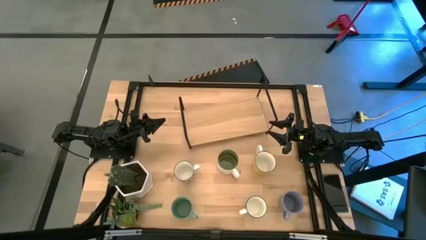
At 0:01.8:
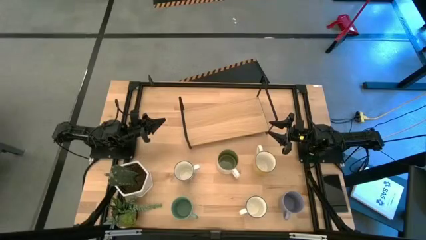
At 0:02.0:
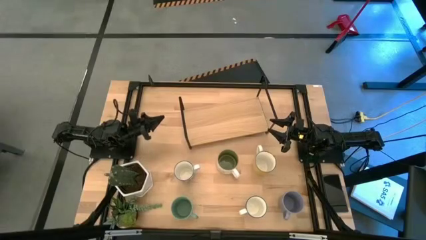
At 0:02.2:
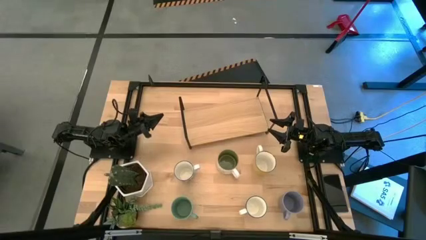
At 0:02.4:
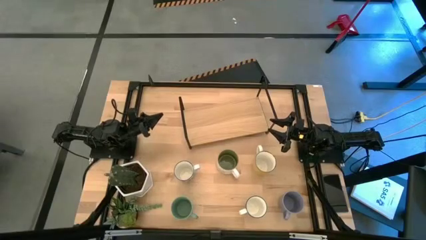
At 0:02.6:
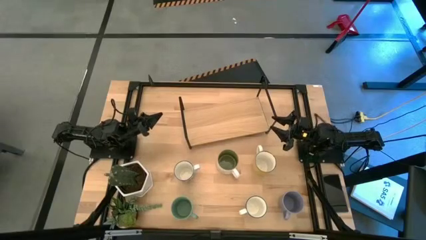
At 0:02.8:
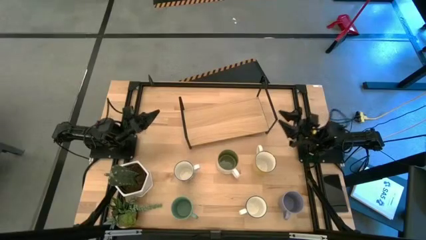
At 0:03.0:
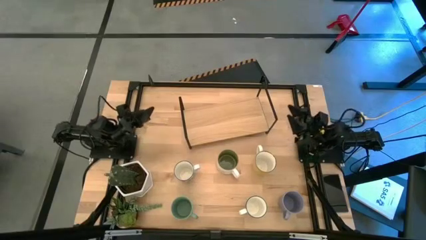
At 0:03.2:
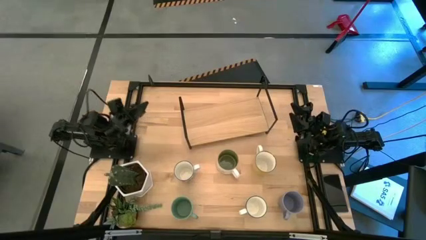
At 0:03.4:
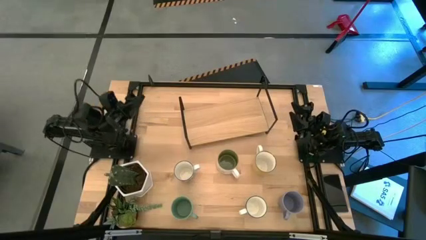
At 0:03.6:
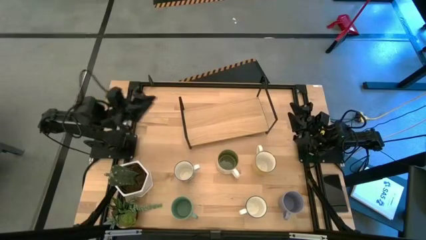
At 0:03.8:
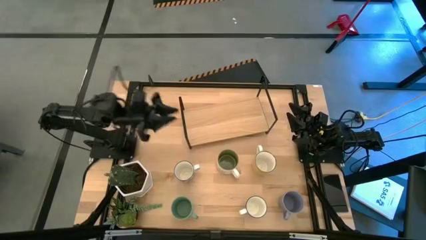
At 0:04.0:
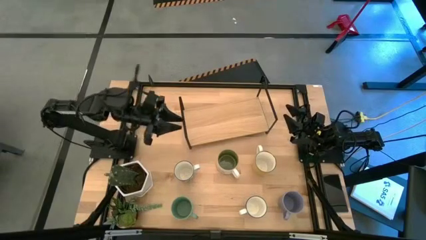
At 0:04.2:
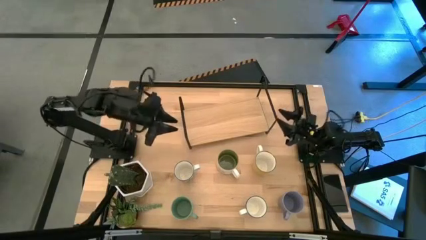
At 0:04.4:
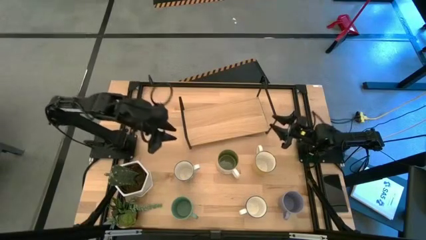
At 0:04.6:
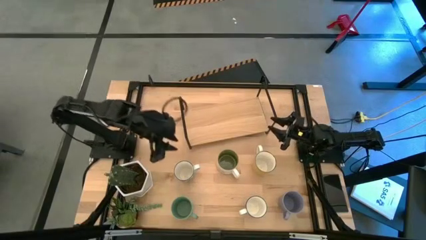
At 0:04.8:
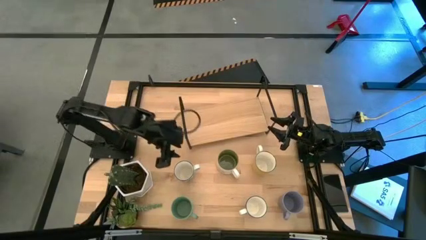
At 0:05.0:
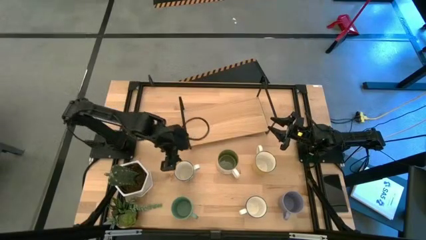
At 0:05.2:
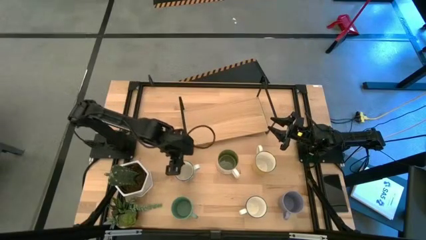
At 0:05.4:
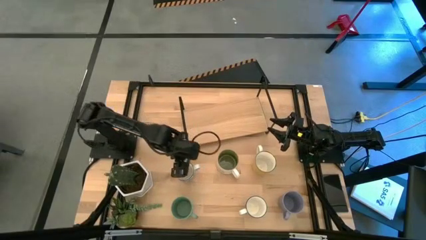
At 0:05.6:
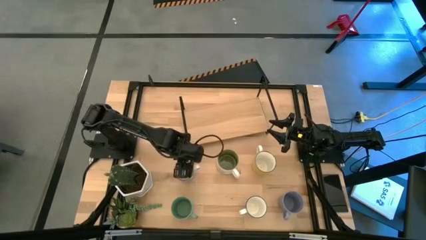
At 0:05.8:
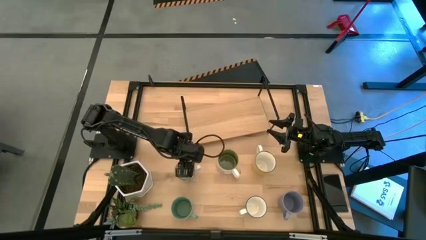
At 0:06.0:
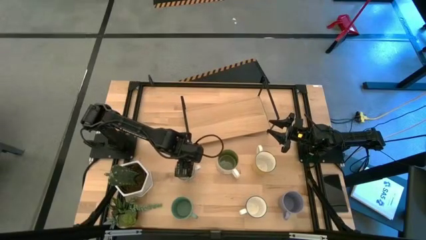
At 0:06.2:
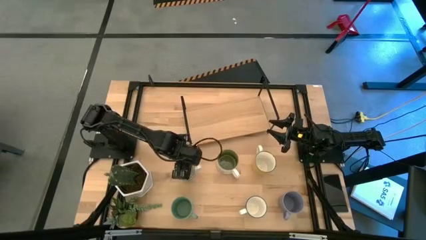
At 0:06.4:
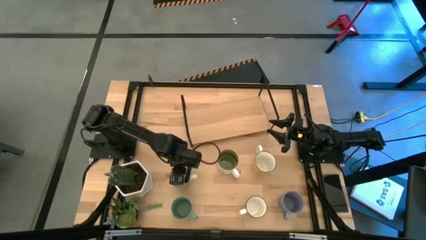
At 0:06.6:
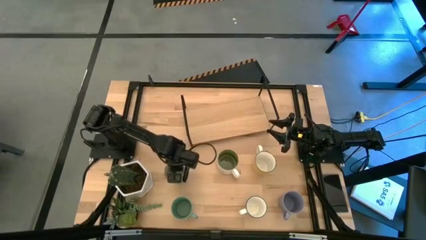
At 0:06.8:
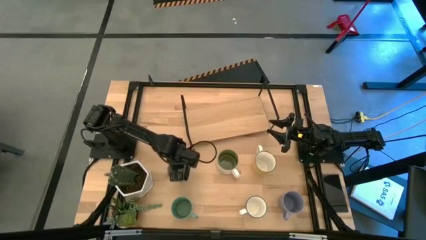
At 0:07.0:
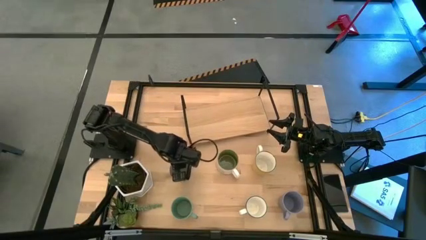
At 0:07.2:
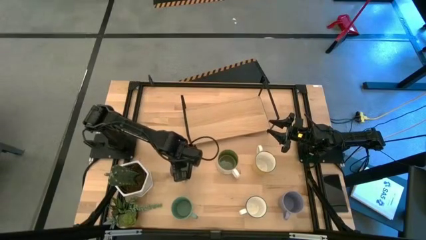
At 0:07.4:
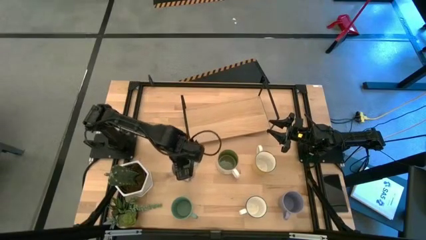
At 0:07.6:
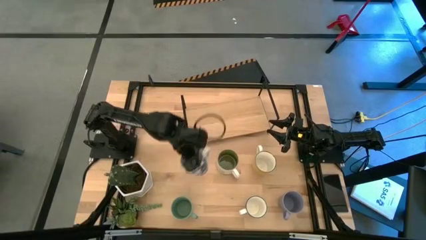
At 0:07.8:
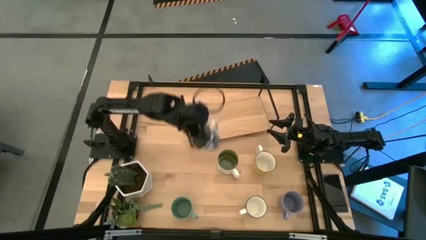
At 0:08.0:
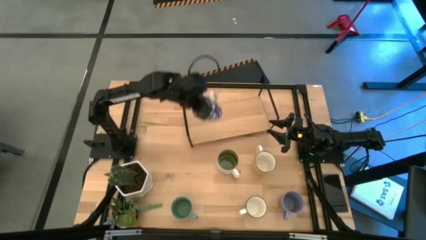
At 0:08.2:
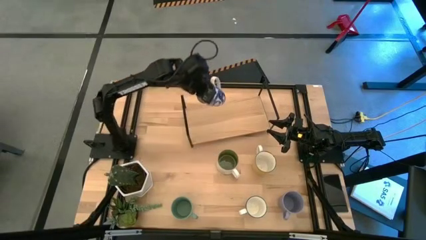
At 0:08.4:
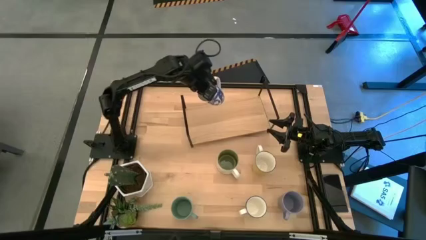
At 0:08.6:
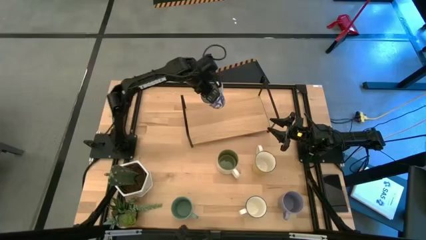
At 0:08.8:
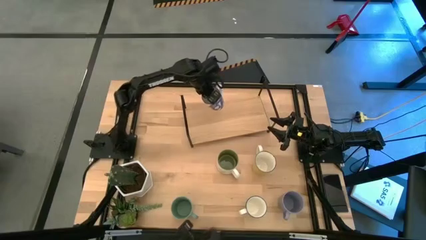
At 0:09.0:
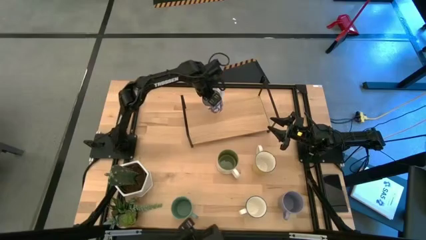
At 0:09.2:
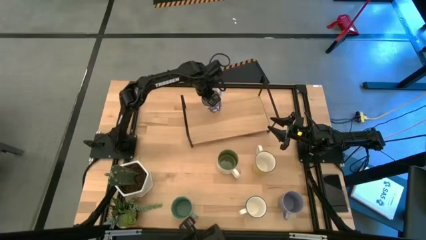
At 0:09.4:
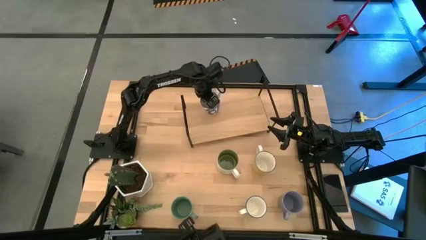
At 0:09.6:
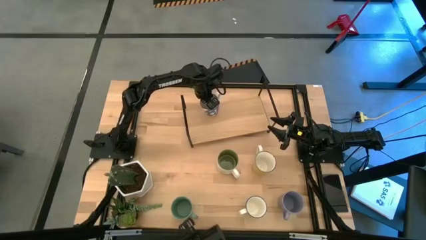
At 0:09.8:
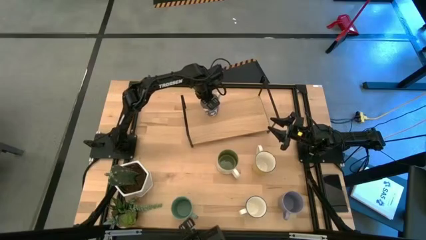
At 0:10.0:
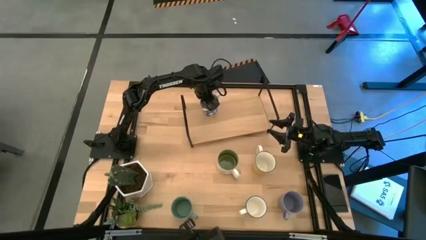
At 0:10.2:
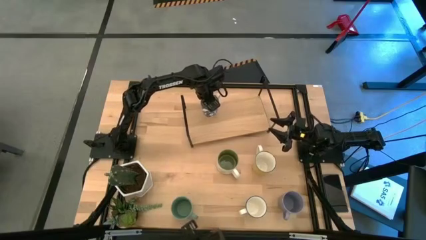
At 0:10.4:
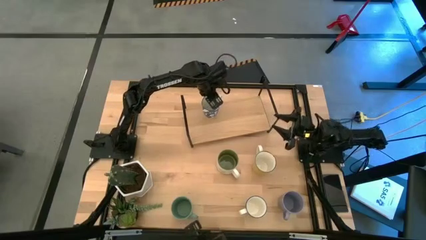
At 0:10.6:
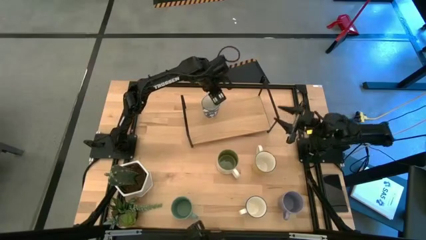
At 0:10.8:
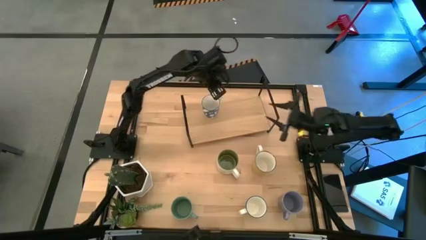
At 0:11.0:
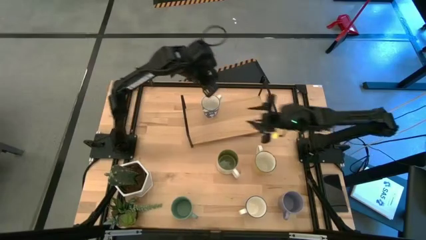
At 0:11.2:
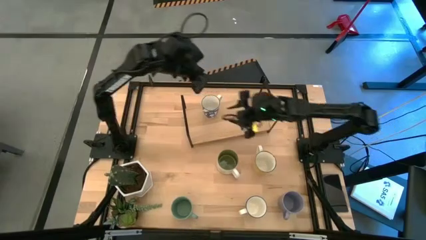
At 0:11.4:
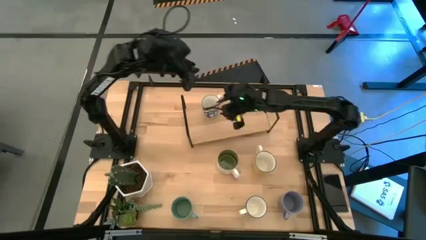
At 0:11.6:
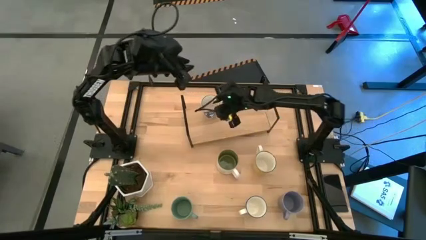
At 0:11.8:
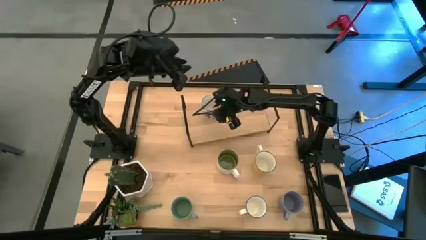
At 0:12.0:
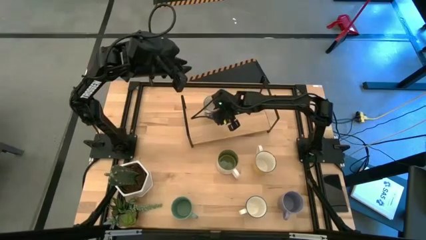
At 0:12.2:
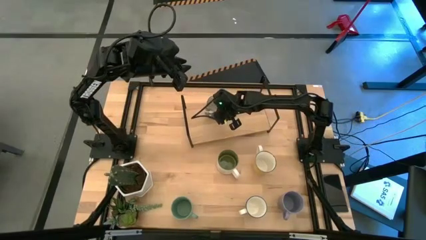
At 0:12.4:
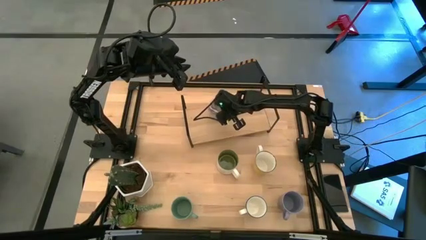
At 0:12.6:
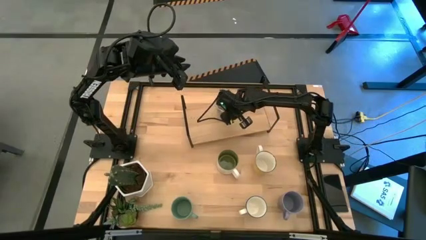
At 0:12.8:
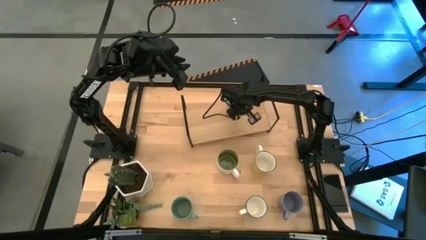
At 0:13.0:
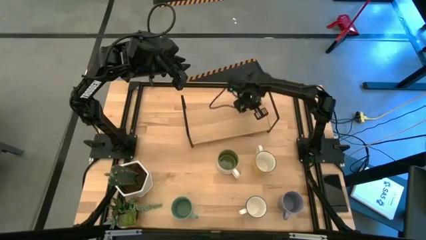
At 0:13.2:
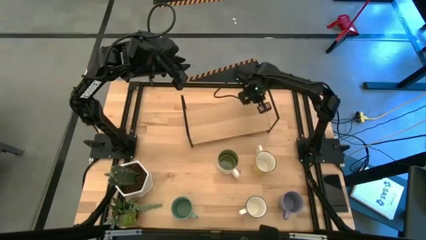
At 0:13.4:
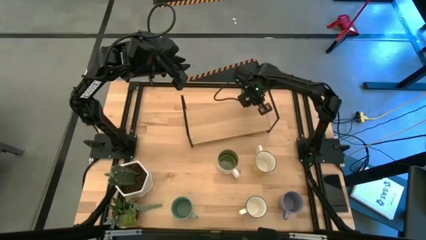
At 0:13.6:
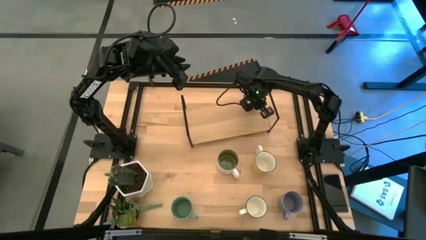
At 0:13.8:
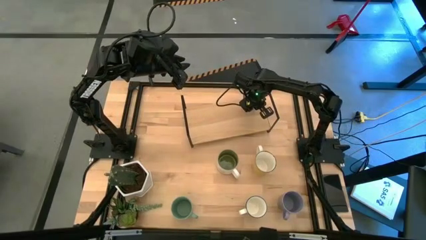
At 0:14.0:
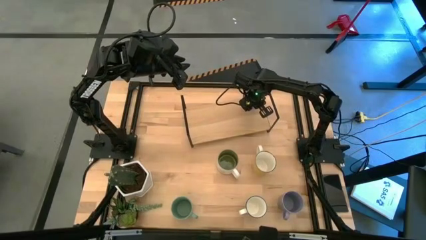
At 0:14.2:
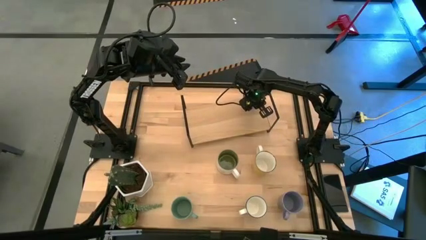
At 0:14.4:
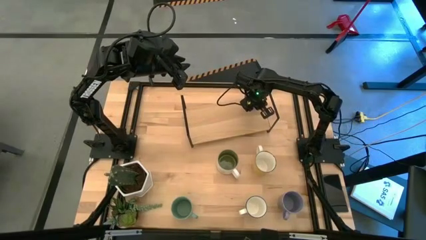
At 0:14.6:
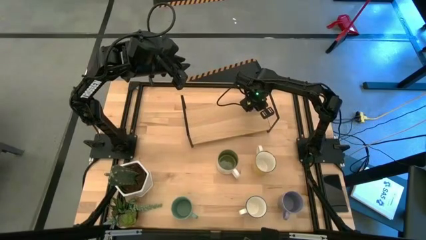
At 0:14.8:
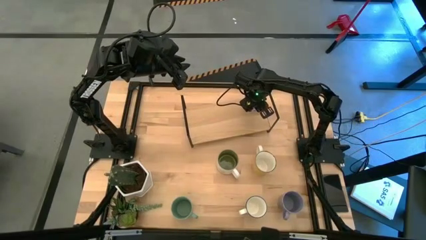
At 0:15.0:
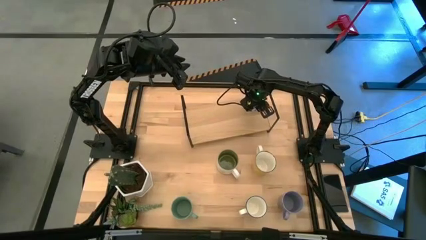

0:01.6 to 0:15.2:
Task: Place coffee mugs
Put the top blue patterned mug on the shelf
